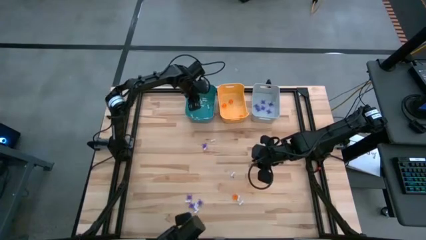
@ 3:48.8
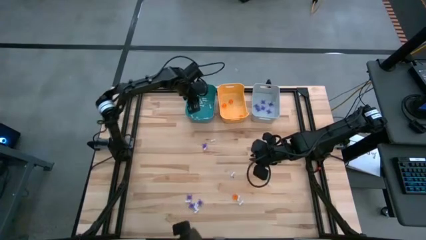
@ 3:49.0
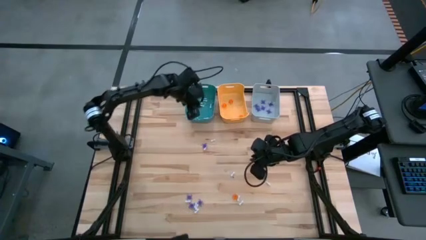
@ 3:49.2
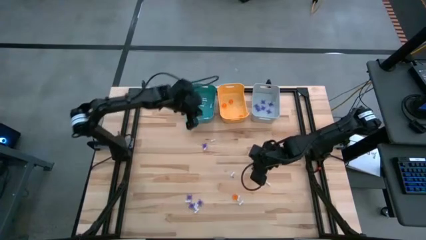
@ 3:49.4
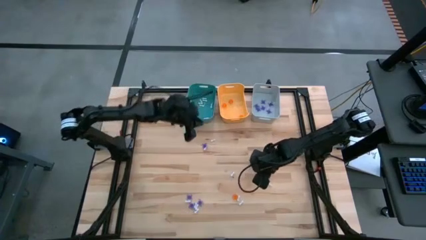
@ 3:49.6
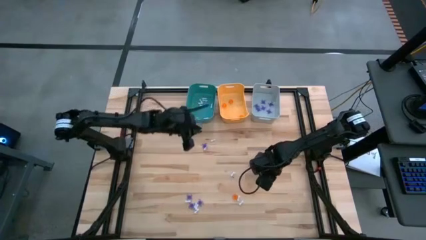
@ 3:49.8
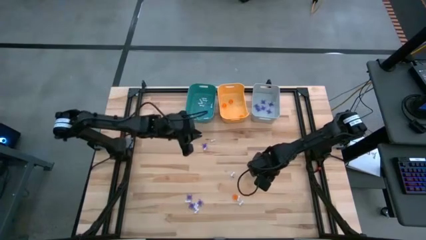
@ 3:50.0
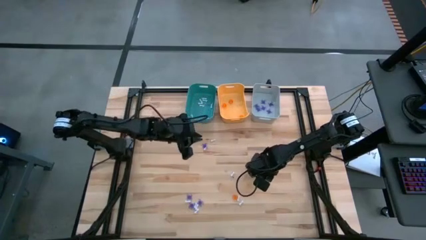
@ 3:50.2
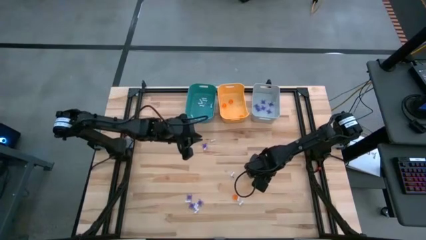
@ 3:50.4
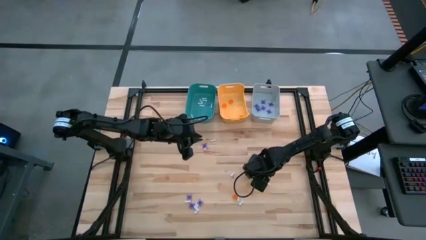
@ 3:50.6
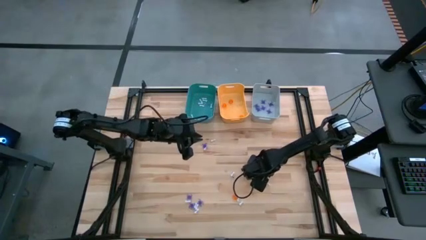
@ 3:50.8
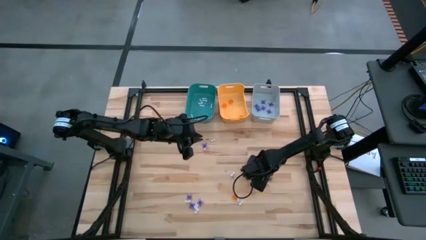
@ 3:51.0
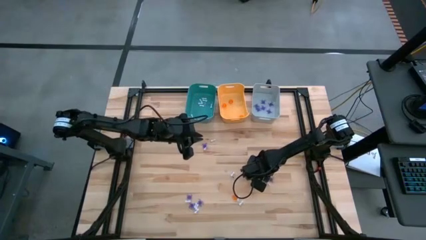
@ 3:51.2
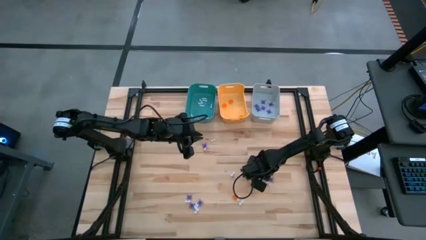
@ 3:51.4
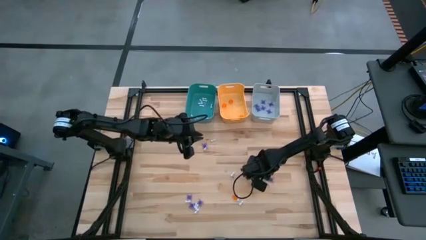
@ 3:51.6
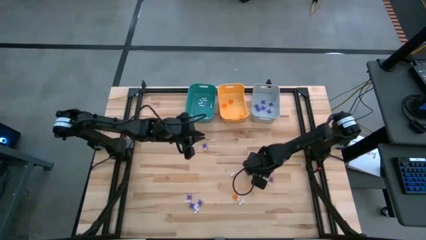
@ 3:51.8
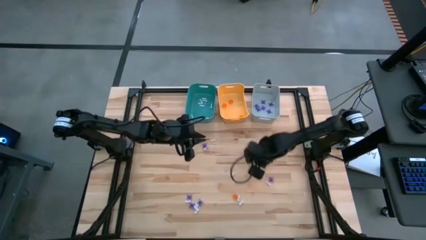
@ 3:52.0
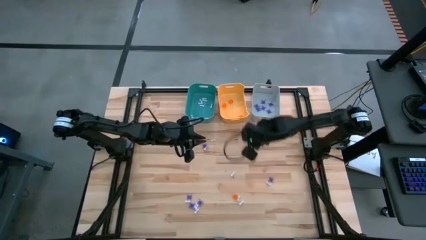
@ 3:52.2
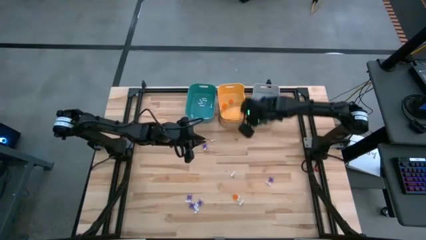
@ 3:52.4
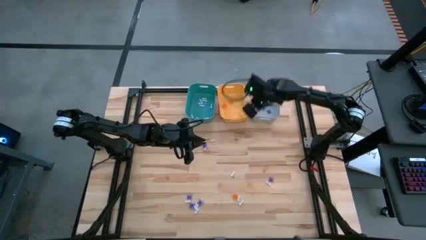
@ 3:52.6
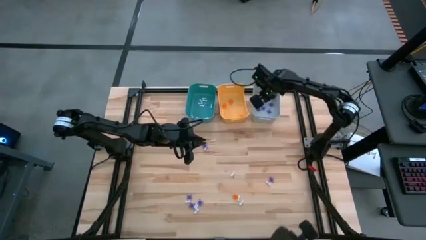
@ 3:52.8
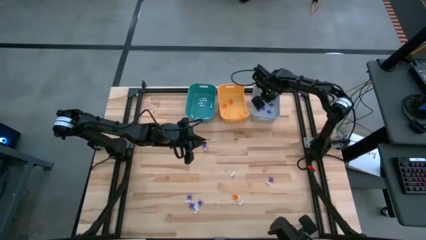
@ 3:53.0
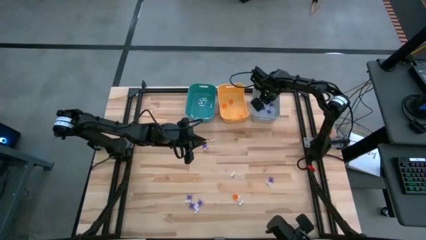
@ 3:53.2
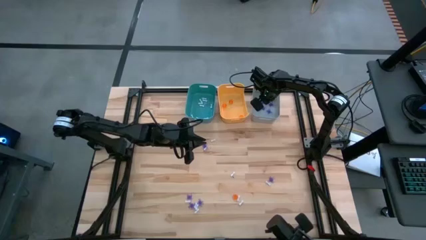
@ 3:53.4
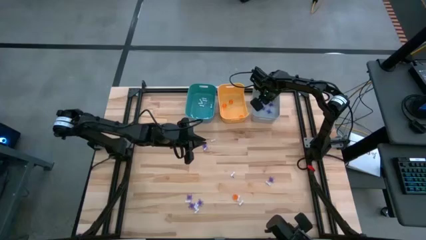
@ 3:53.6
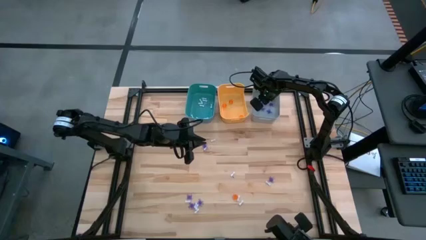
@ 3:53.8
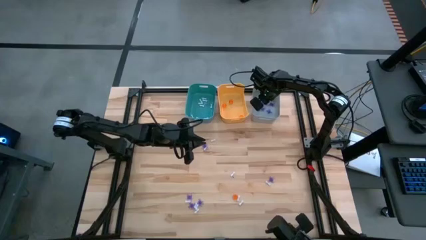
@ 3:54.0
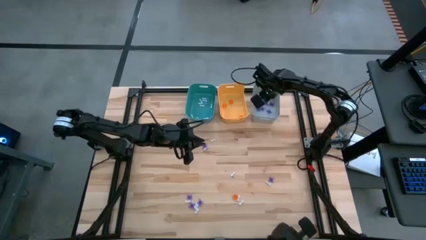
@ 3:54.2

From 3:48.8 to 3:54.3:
Task: Sort Halloween decoration
Put the purple spider toy into the gray bin

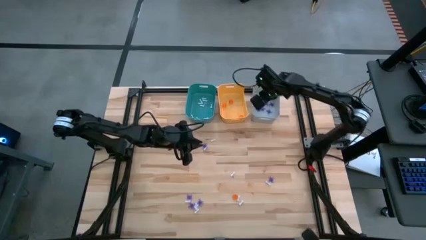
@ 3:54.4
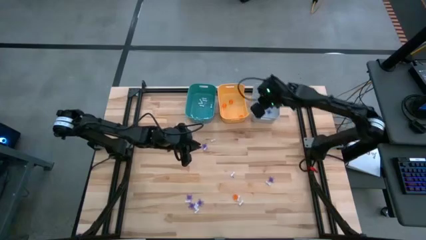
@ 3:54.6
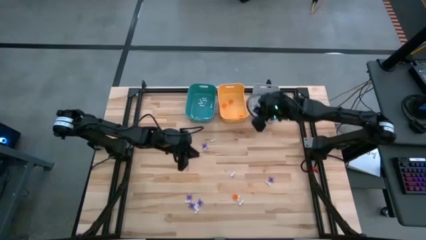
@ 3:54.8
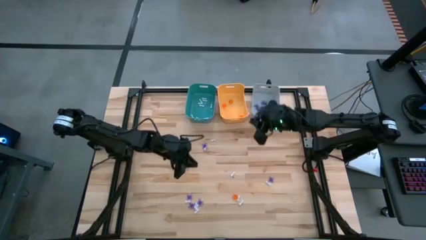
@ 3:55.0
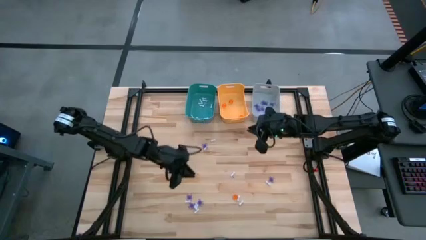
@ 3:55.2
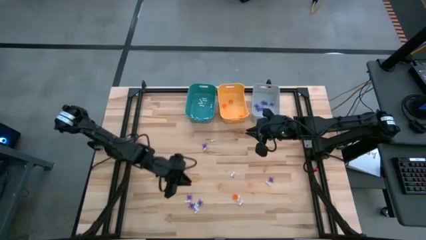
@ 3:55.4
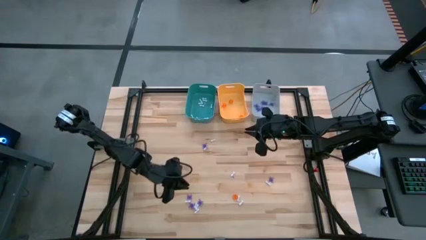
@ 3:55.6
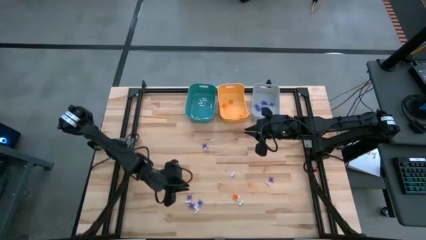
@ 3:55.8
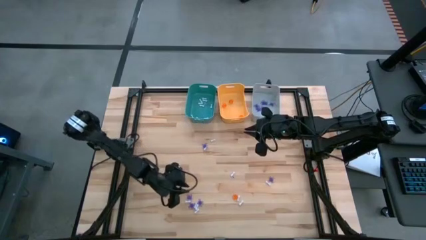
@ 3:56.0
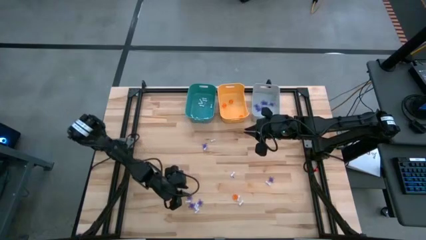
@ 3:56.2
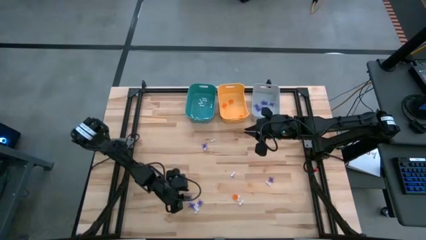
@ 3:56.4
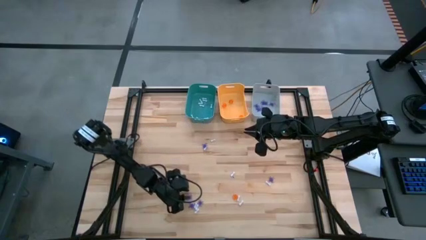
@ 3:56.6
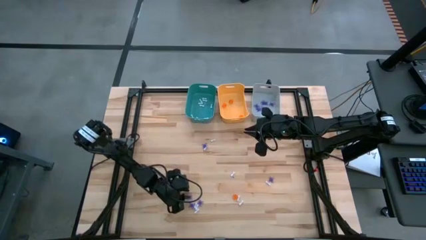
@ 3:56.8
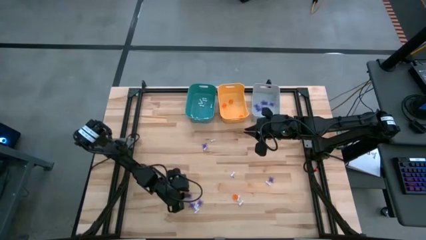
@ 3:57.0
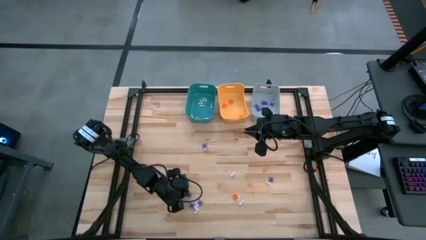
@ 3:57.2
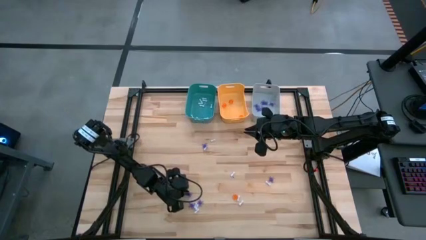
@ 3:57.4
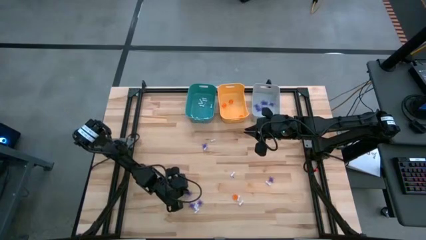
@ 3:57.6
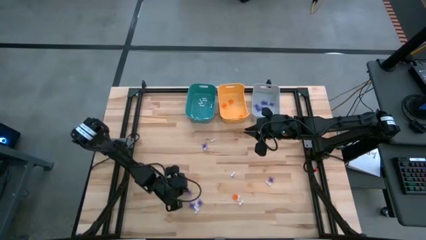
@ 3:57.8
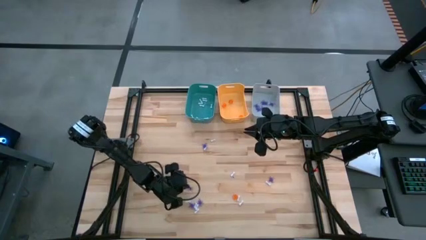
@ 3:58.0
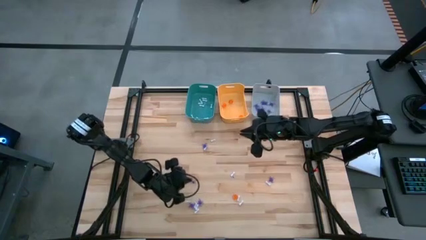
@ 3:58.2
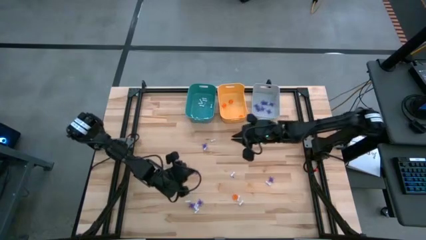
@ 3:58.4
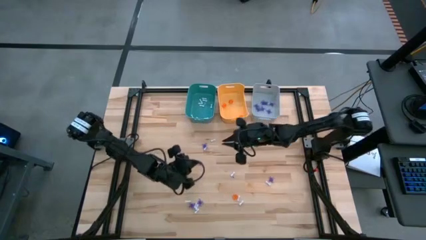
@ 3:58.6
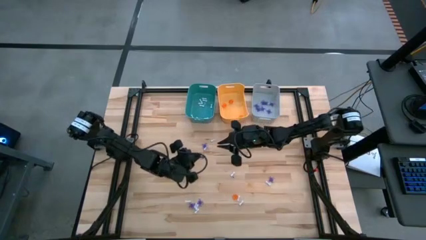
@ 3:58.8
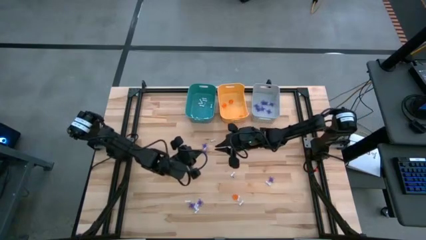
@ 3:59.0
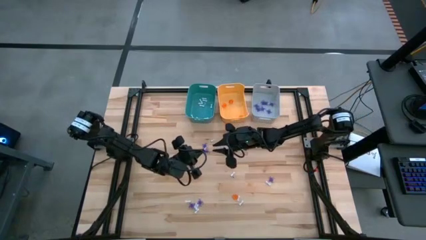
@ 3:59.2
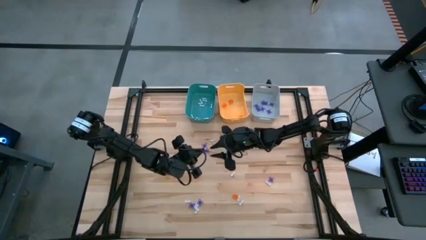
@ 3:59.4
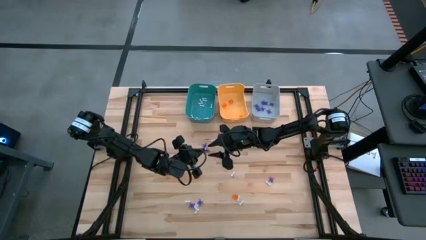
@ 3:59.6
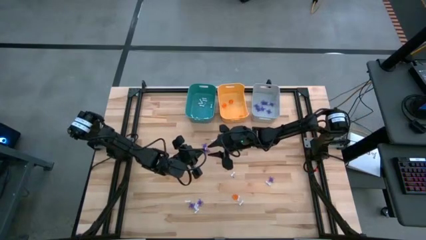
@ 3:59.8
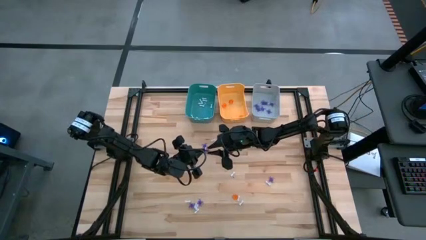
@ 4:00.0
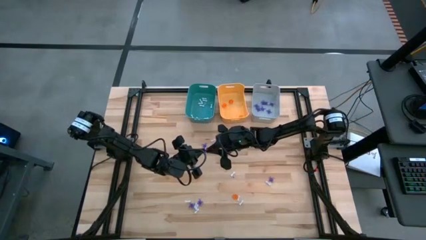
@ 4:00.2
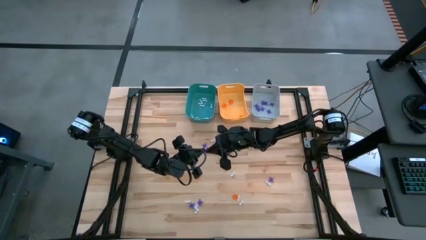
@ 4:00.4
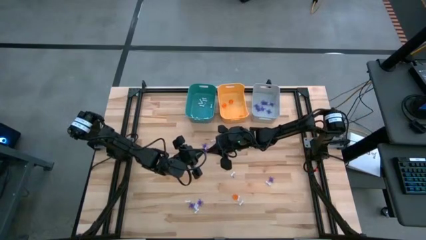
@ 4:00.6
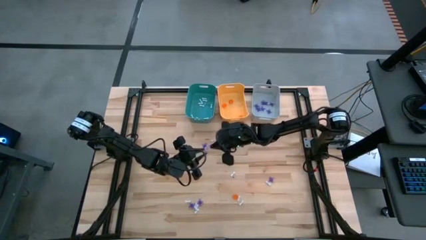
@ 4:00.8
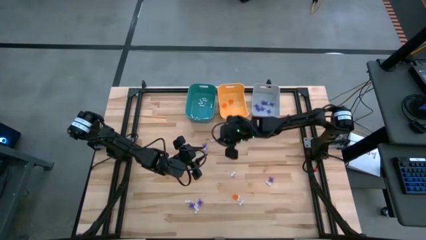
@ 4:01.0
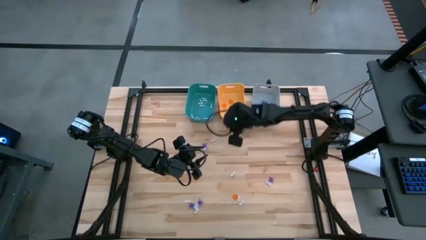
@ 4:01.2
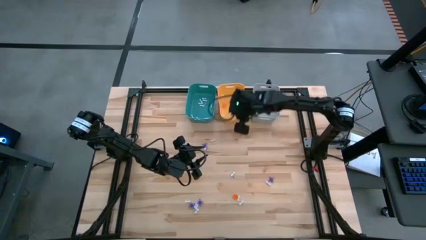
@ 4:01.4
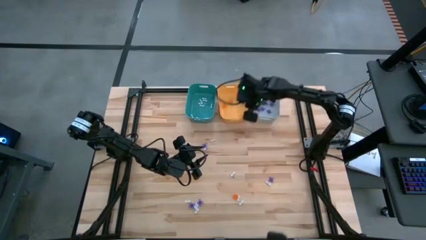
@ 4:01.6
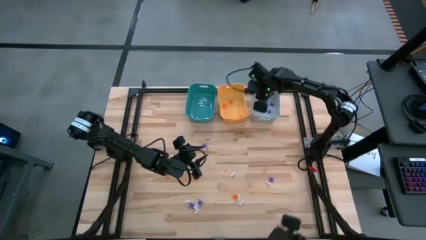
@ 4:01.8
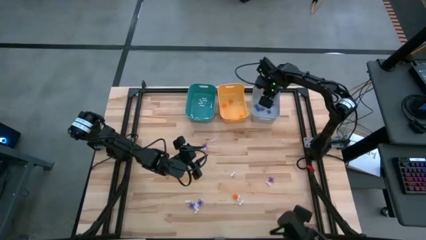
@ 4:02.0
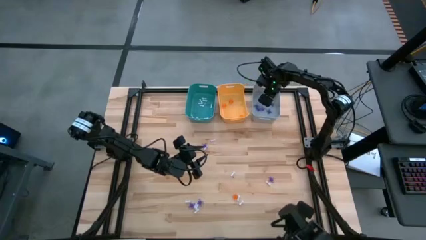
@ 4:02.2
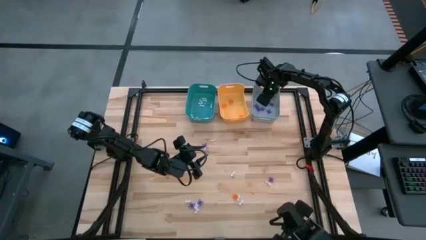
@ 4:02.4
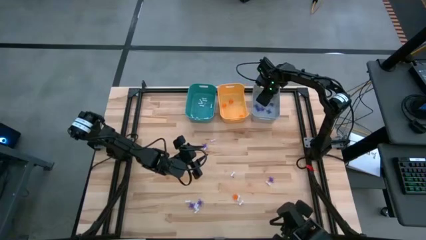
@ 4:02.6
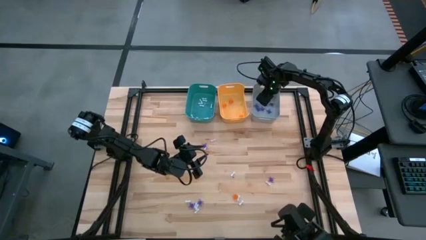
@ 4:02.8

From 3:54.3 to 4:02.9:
Put the purple spider toy into the gray bin
